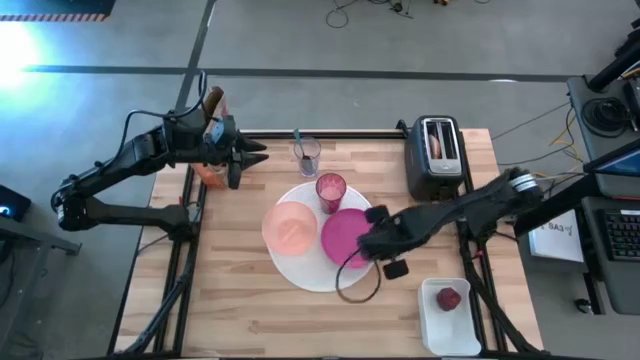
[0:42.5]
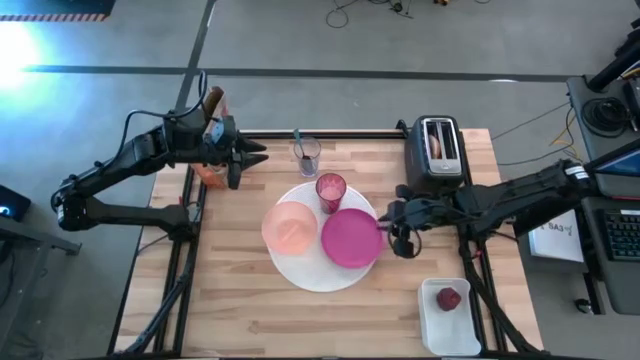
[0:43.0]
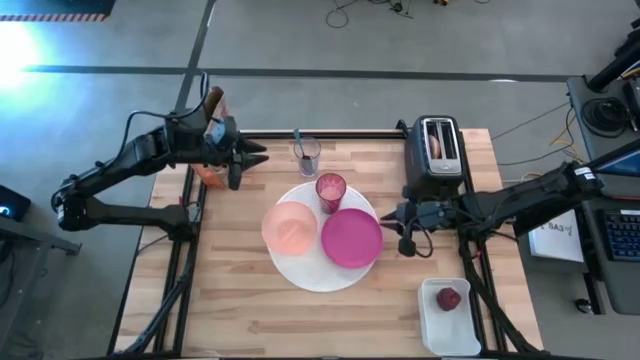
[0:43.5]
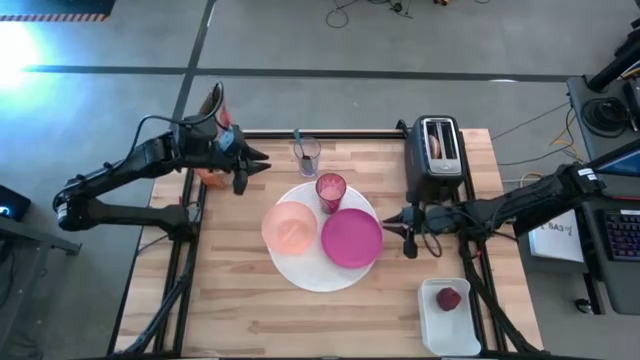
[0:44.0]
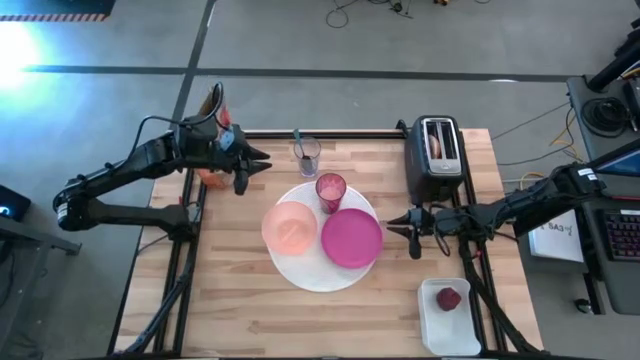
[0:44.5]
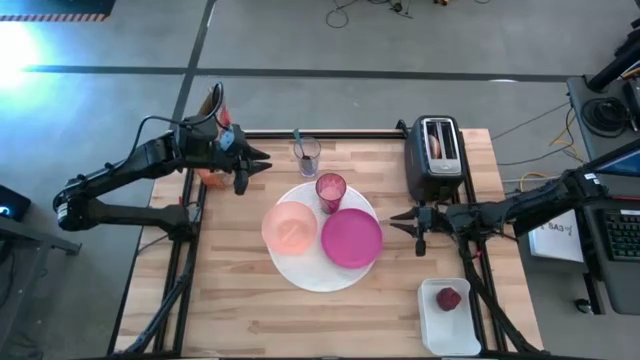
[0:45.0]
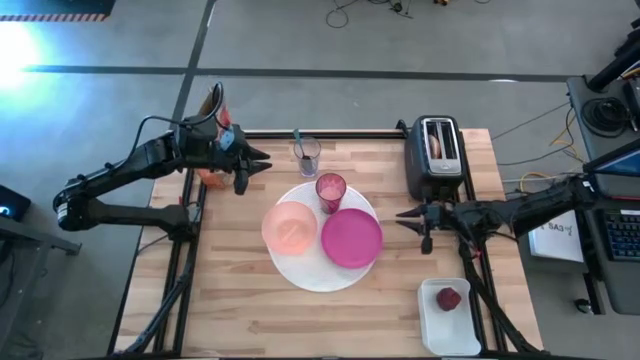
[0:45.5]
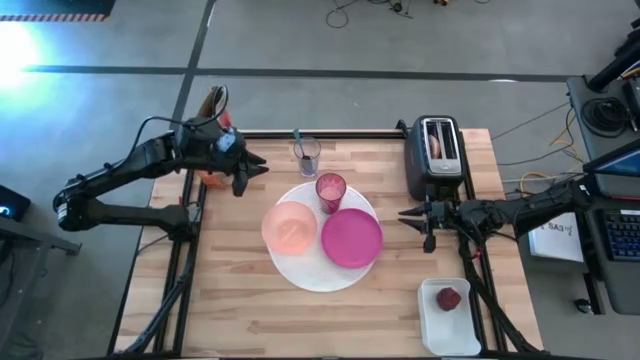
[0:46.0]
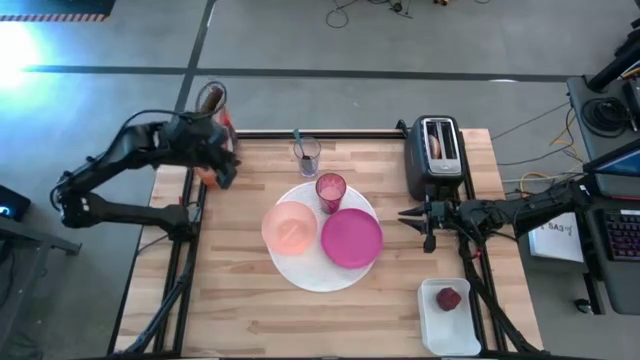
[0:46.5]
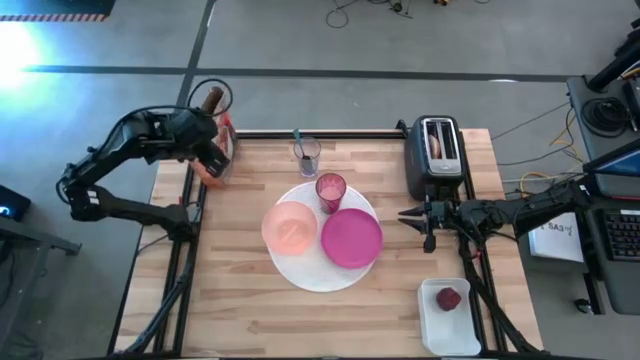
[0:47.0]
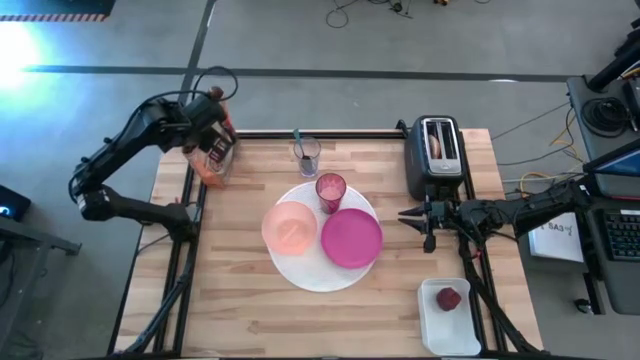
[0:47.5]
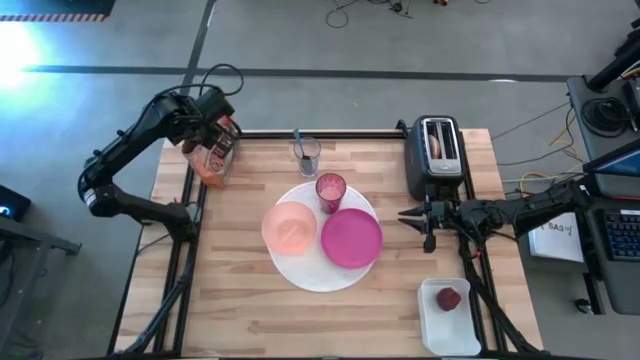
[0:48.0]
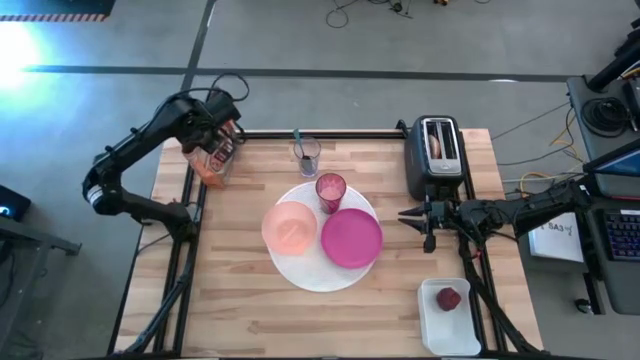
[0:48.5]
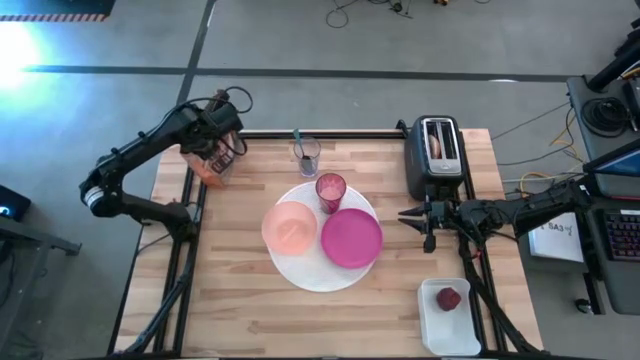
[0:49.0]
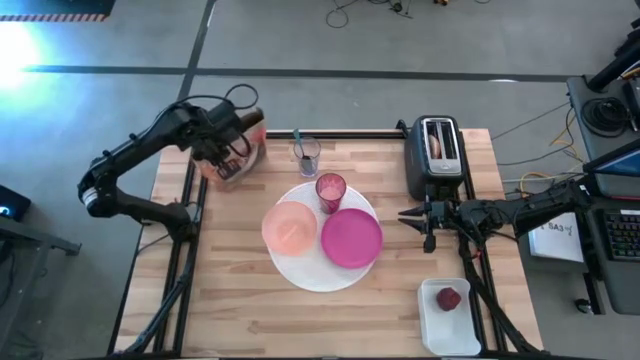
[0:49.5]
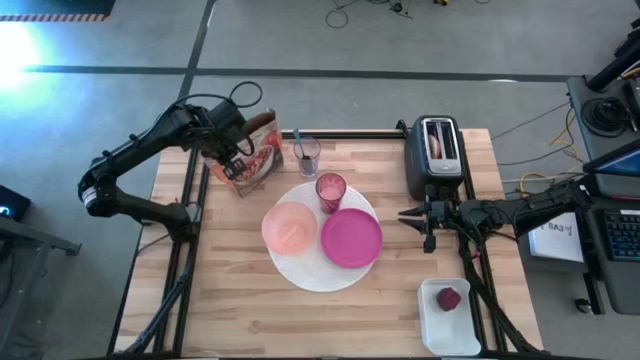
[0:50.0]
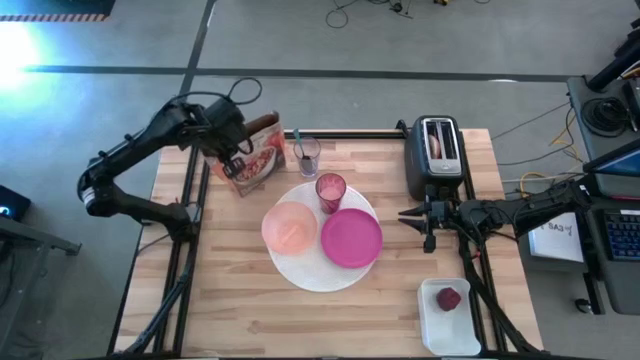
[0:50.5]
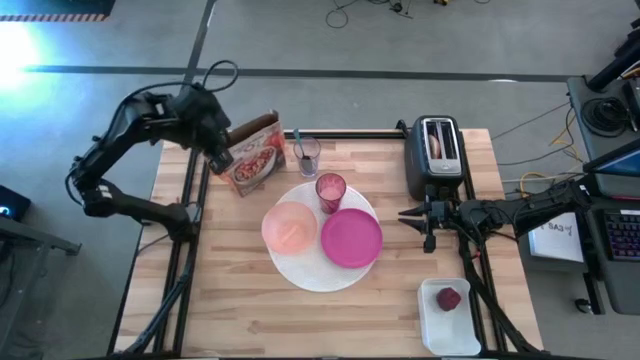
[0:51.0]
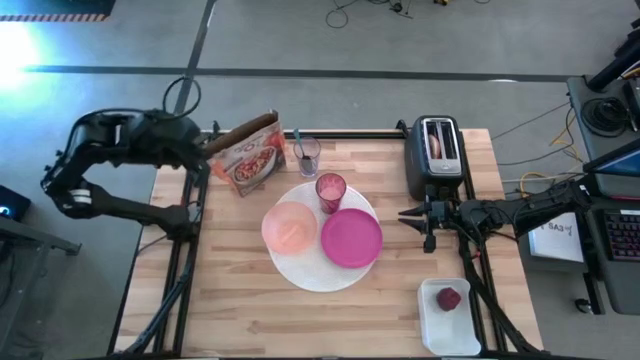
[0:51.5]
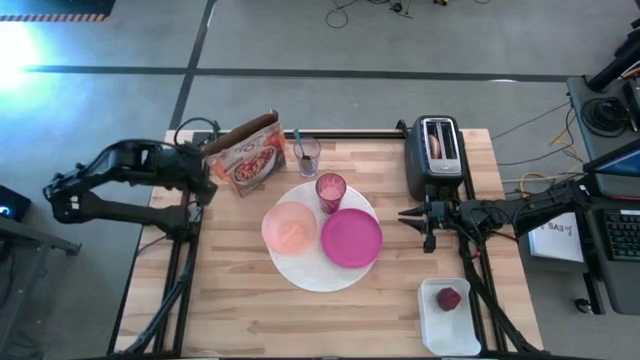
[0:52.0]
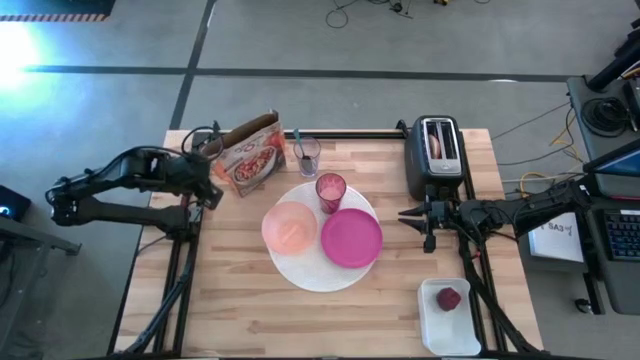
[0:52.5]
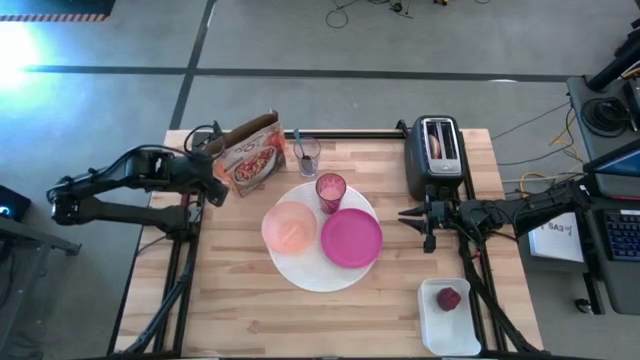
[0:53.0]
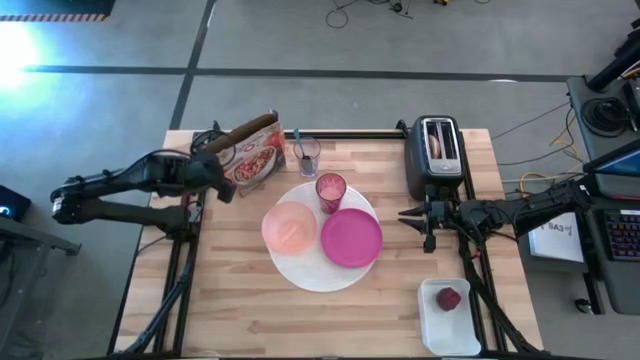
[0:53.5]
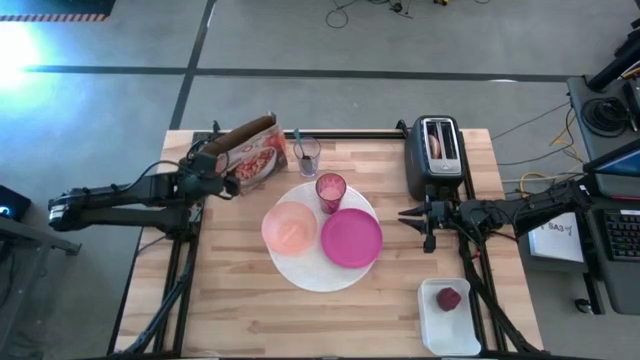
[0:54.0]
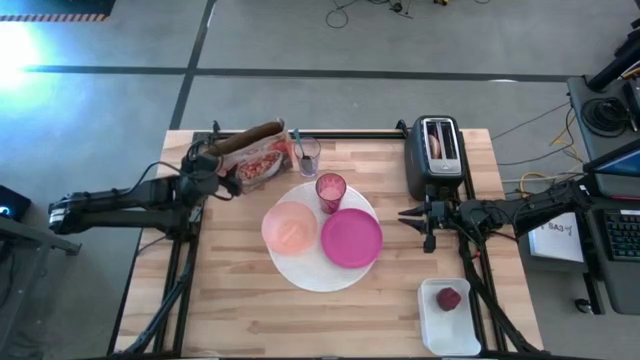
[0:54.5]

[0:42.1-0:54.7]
Task: Arrange a breakfast setting
Pour the cereal into the orange bowl

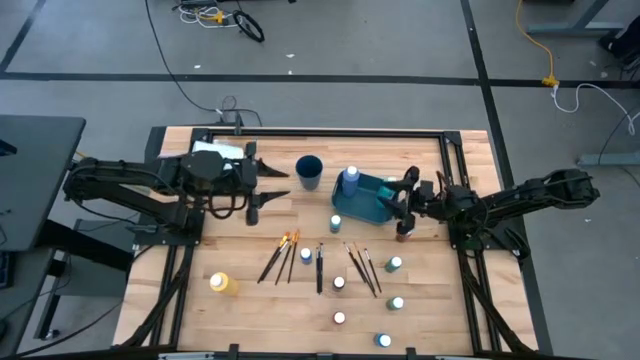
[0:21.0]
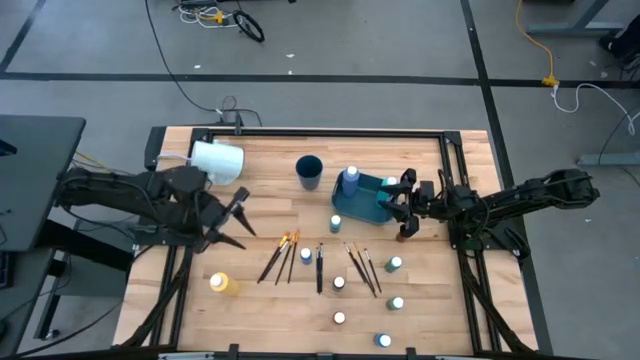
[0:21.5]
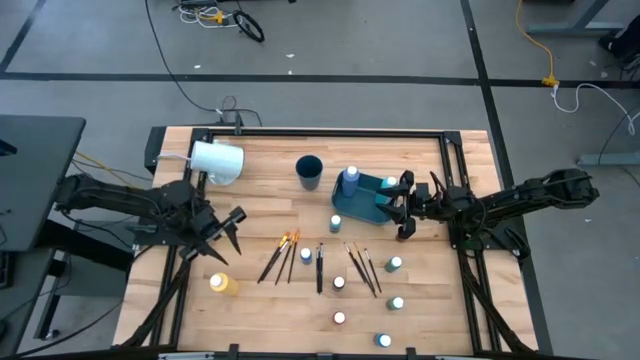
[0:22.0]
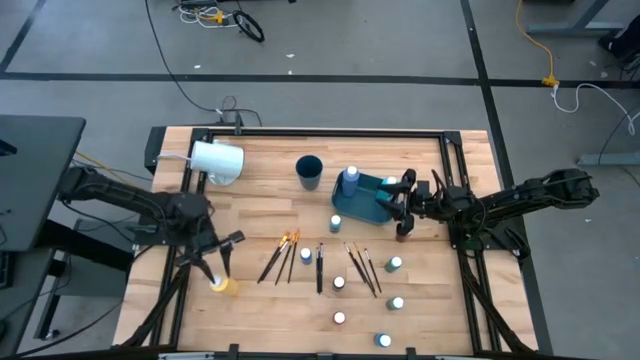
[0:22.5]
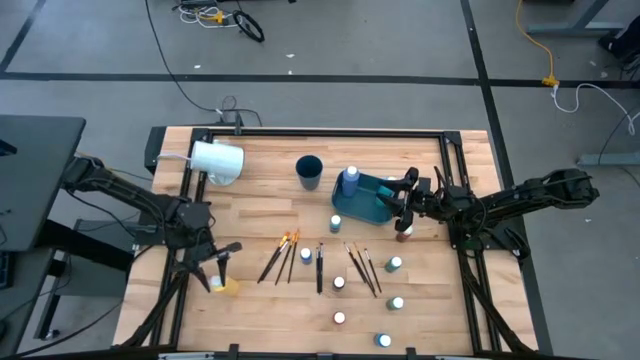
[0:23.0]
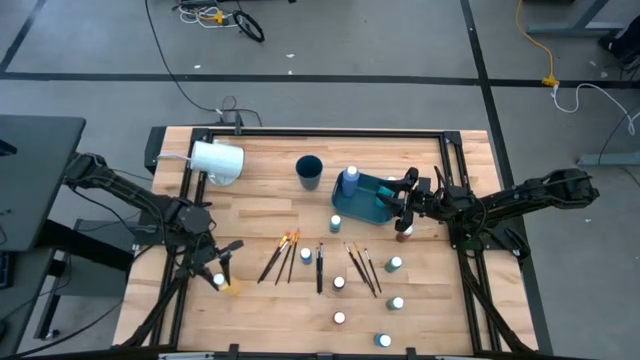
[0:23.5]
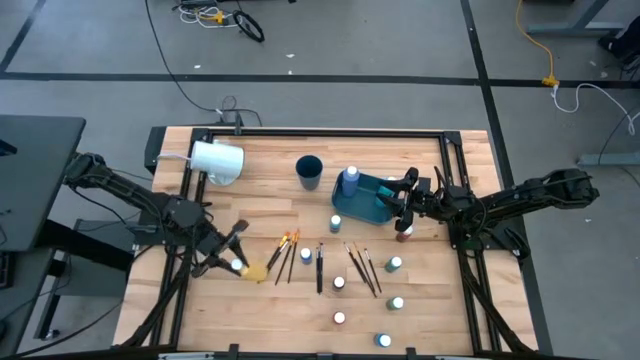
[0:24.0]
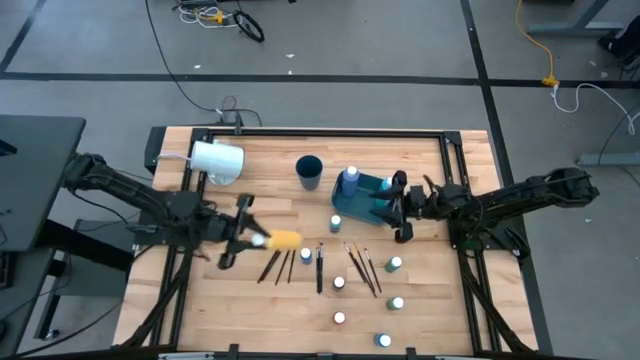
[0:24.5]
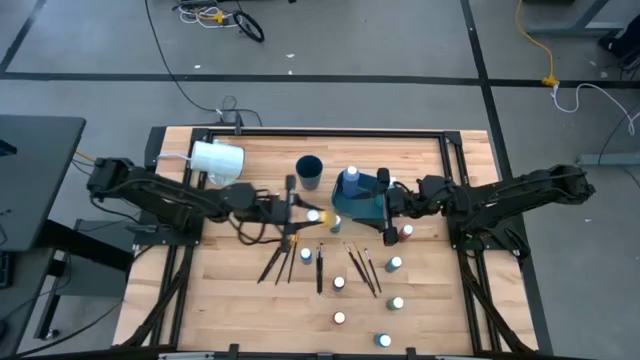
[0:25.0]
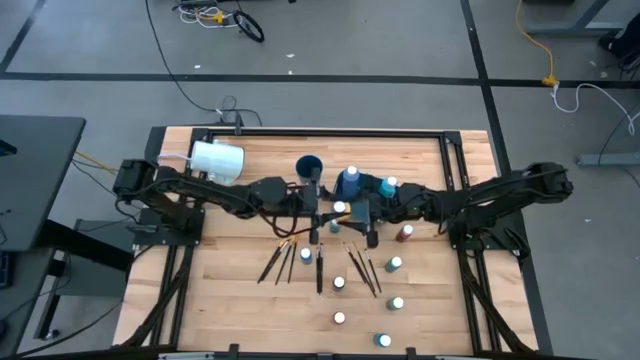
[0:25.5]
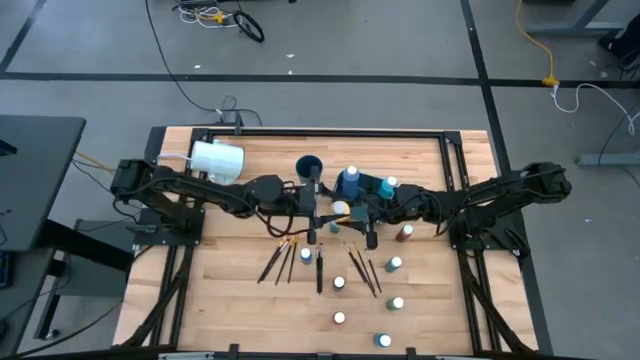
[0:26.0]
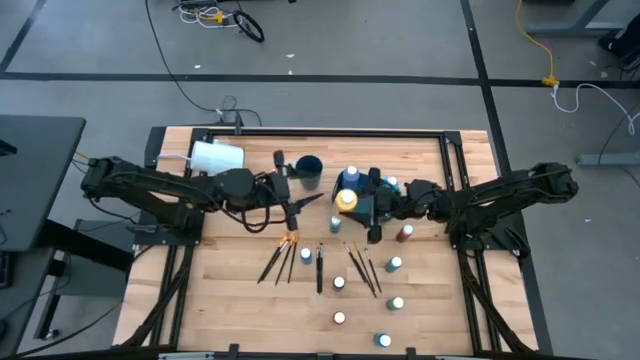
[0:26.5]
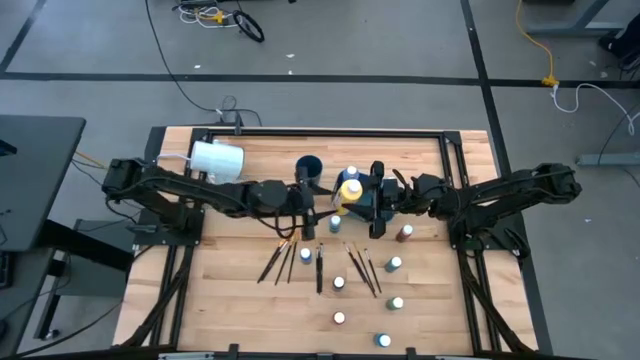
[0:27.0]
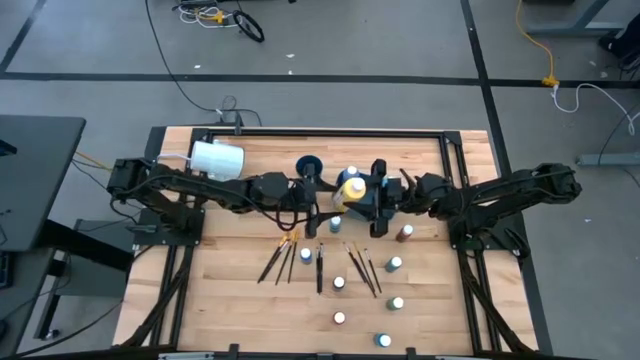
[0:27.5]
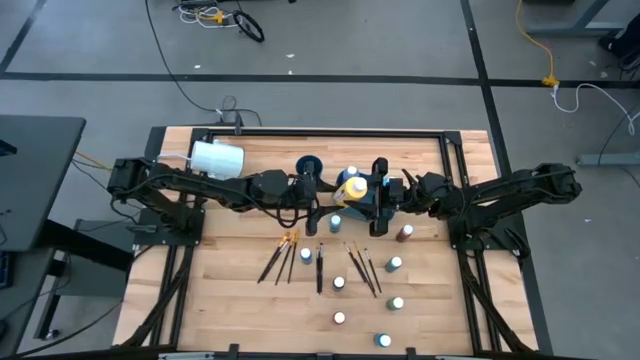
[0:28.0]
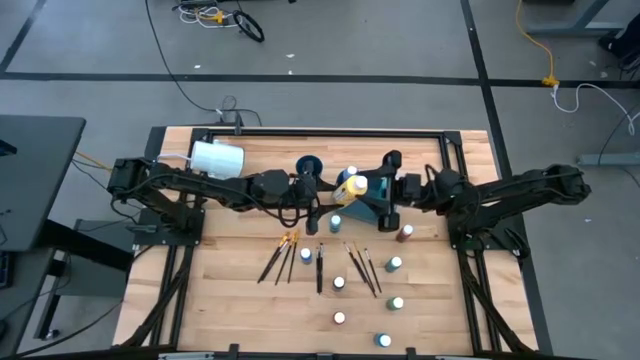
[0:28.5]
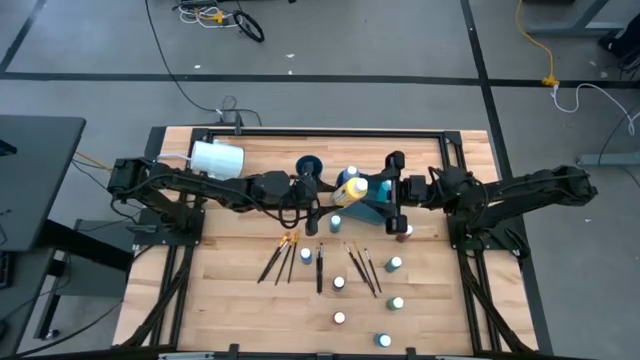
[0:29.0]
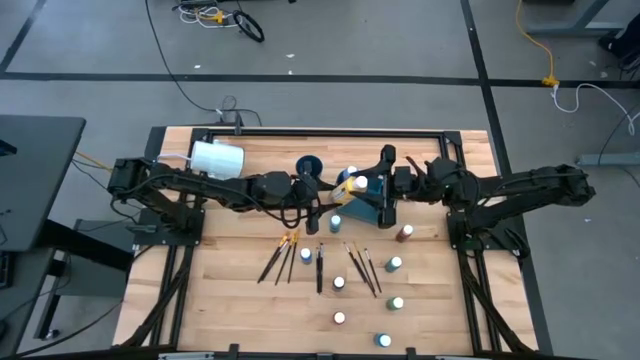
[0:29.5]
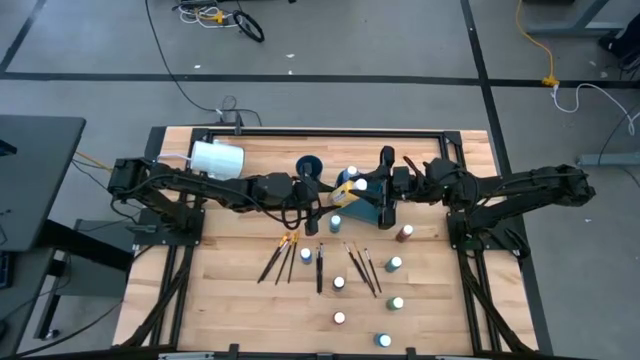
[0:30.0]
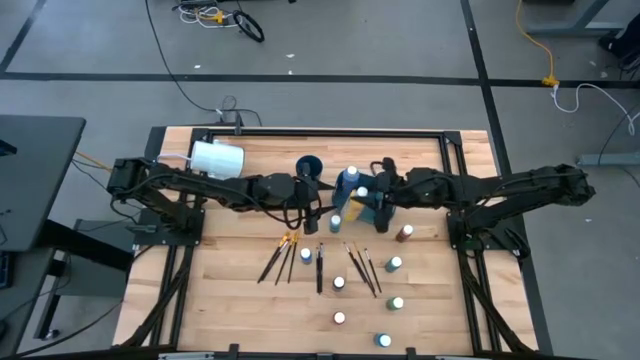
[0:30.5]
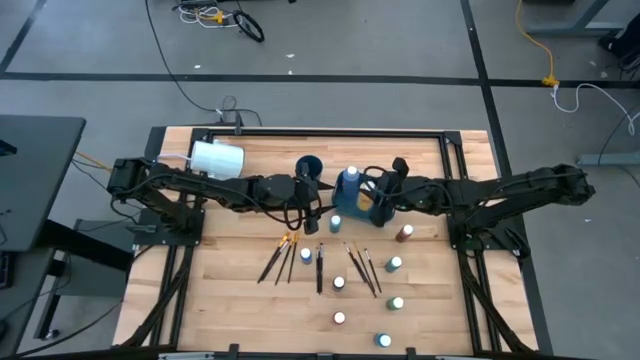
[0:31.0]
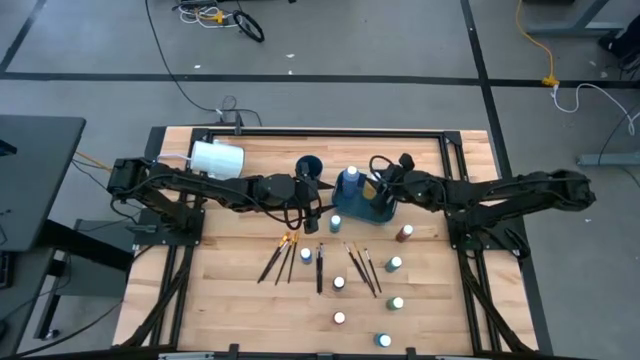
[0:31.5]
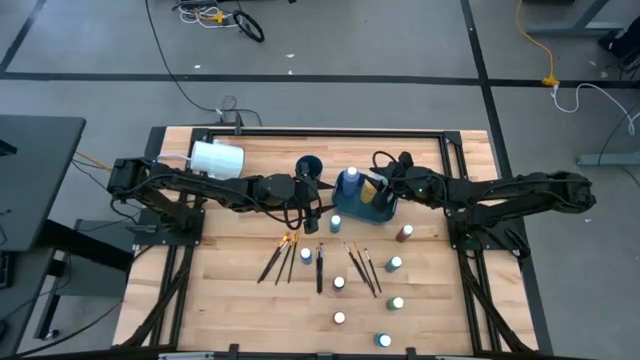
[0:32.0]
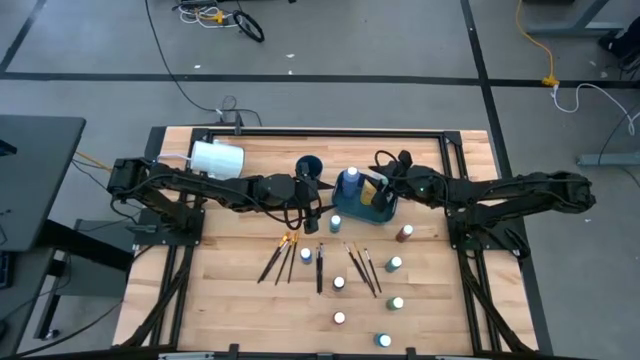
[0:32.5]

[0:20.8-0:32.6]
Task: Pick & Place Paint Supplies
Put the large yellow paint bottle into the blue bin
